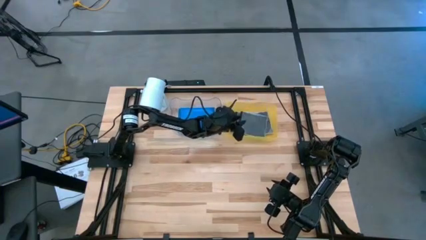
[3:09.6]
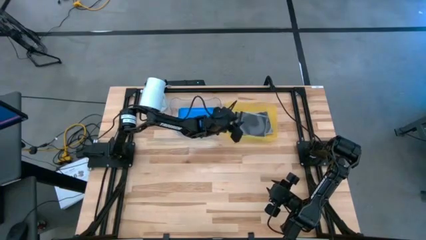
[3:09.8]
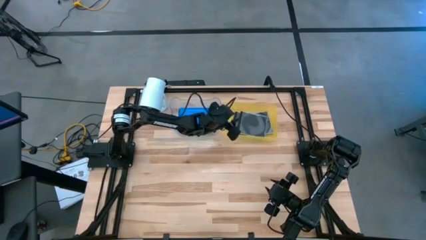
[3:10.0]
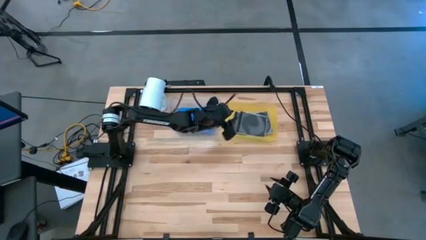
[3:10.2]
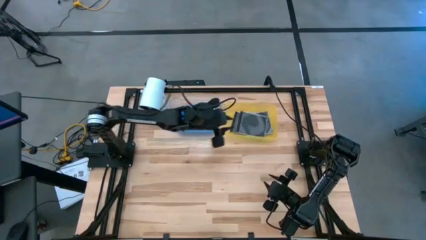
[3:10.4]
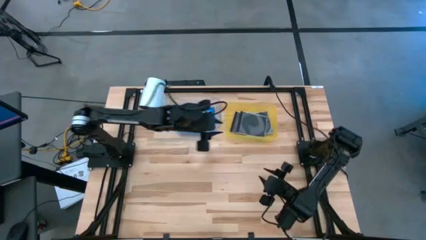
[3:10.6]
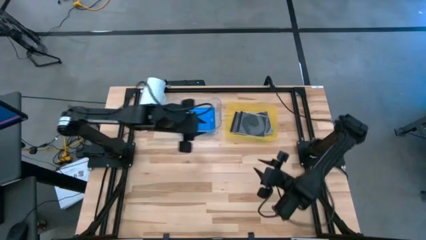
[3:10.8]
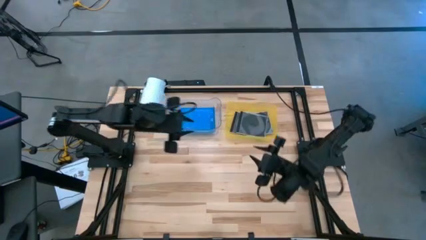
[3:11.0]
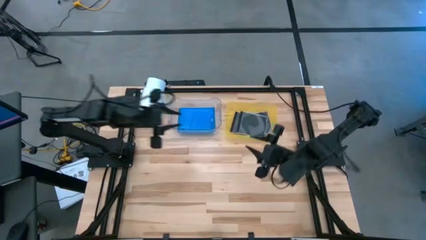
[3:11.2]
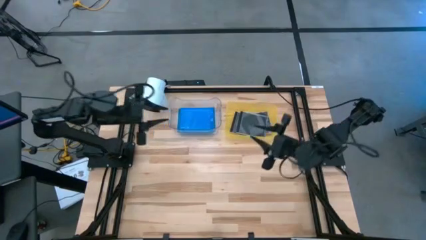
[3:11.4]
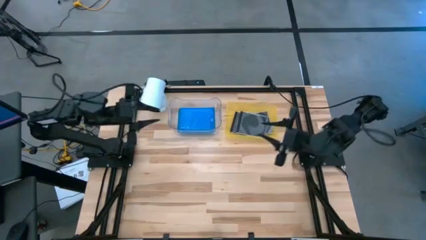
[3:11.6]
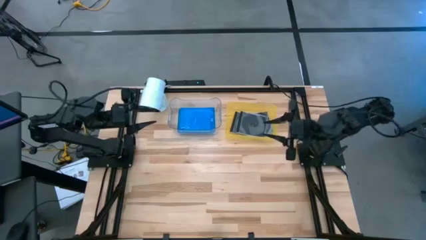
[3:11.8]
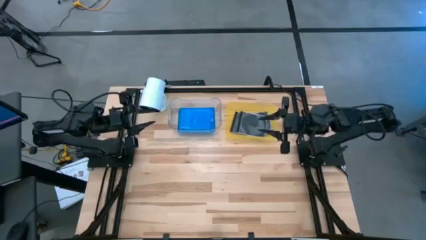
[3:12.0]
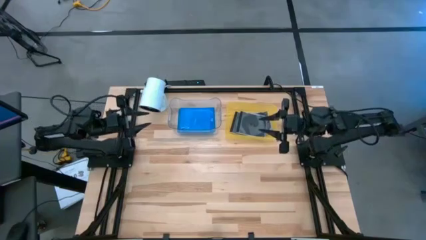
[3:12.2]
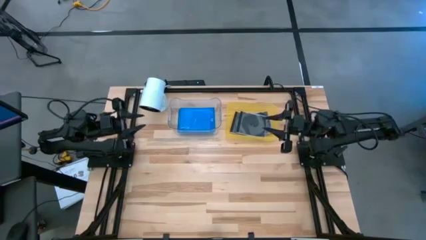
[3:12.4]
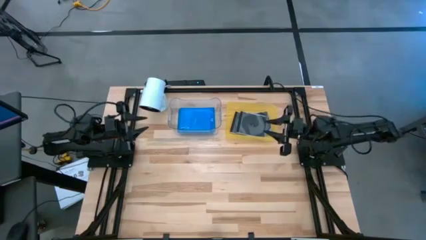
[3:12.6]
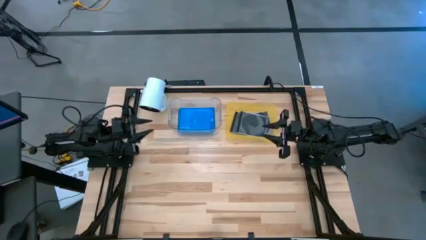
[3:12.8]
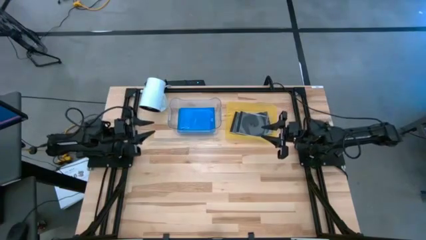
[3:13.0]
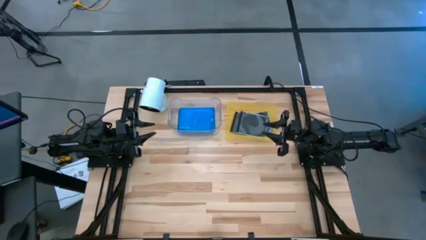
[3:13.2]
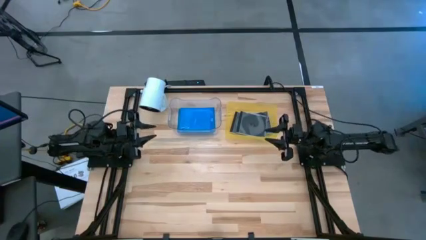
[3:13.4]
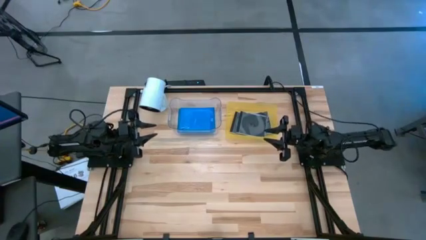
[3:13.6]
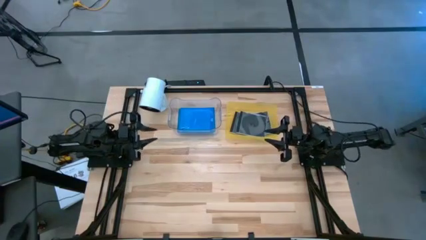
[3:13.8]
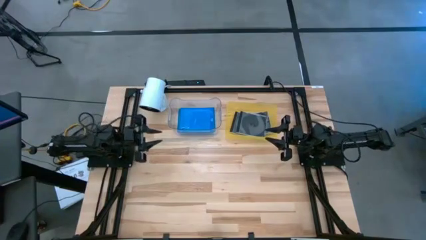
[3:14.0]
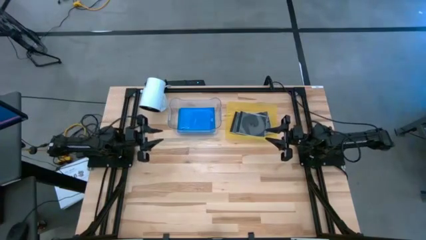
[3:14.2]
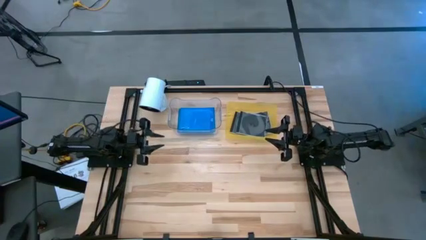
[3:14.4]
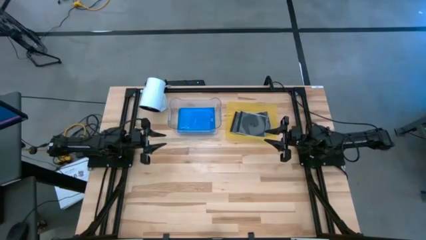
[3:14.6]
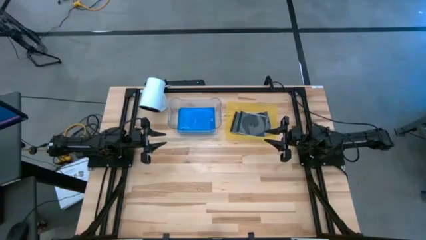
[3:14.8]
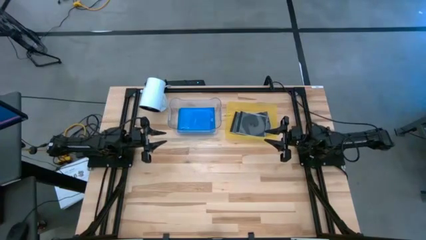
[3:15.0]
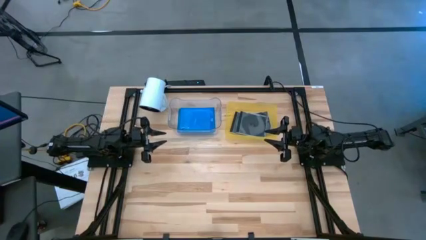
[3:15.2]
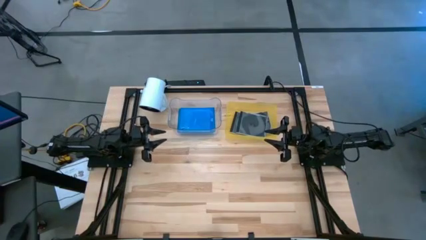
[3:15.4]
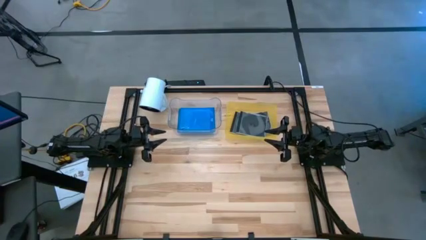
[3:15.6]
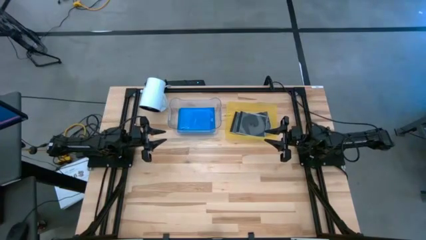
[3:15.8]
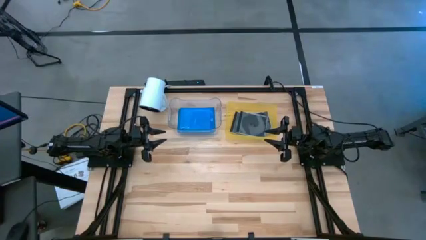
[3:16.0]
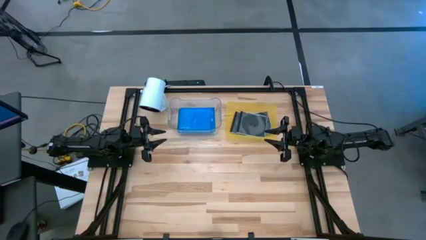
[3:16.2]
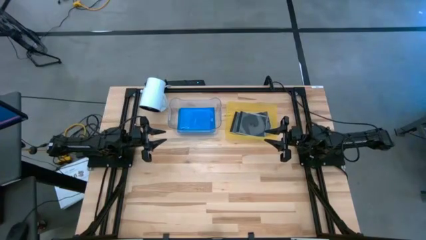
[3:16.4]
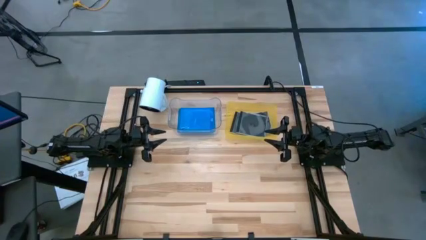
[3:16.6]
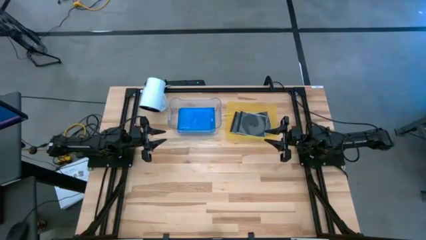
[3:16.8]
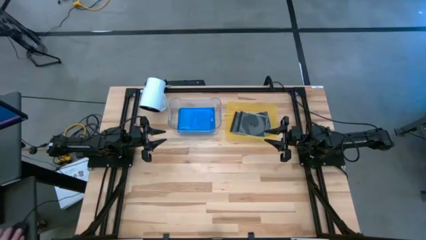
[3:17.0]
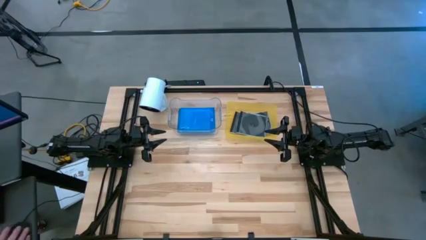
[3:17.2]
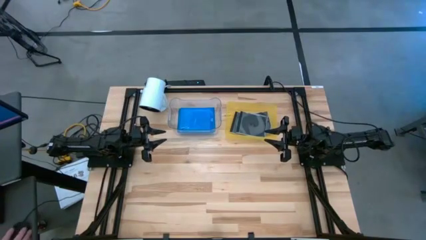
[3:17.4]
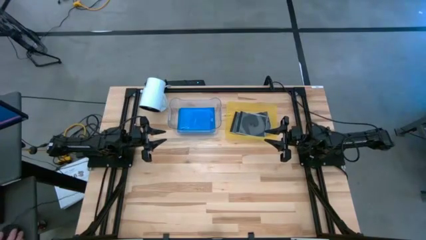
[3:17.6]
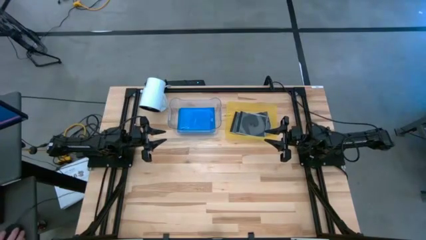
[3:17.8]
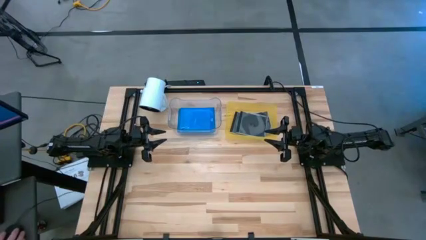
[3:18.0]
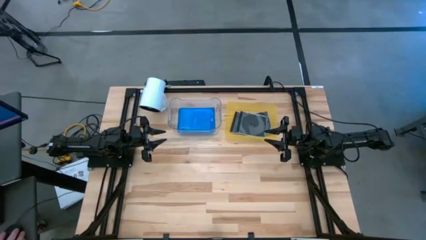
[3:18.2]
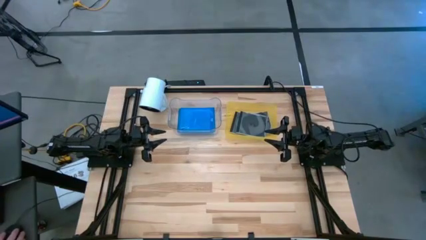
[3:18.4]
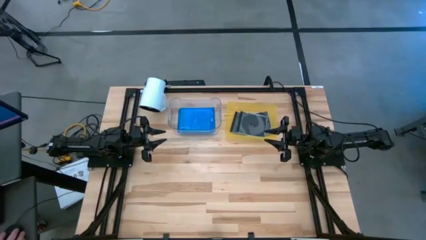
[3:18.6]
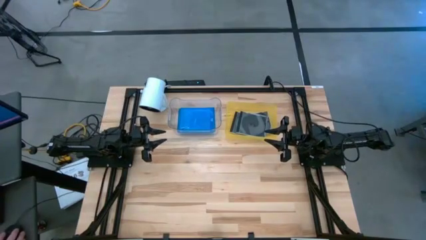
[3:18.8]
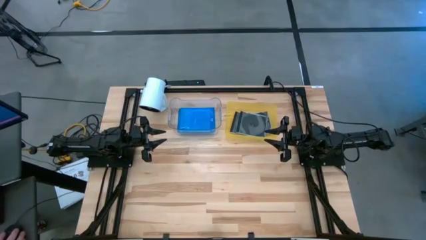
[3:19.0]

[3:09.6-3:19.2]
Task: Pick & place jewel cases by type
Return to Home Position
